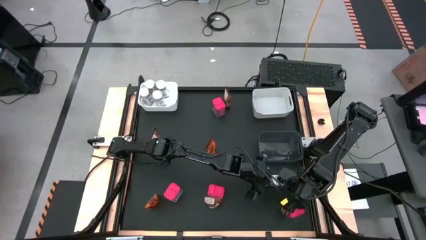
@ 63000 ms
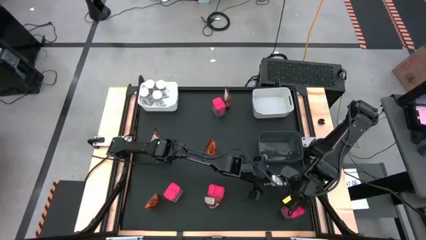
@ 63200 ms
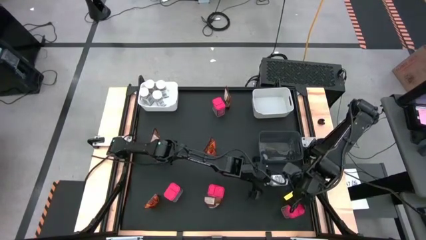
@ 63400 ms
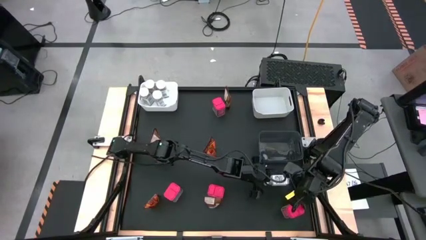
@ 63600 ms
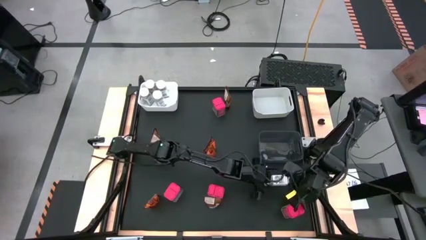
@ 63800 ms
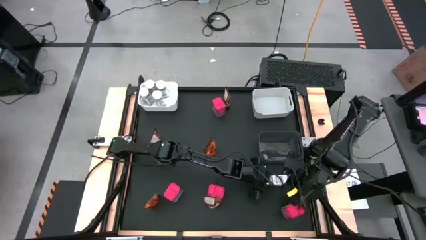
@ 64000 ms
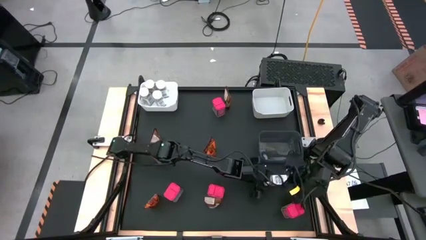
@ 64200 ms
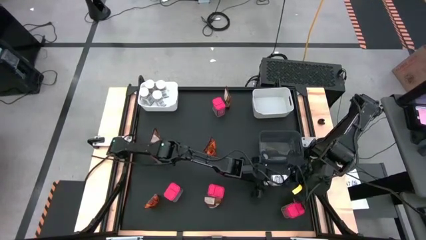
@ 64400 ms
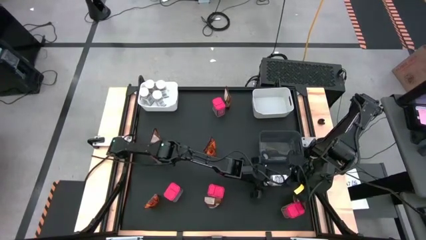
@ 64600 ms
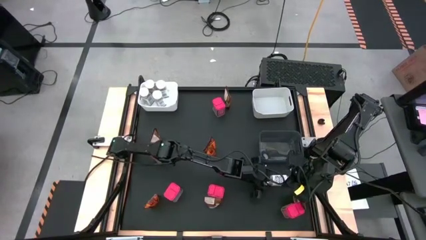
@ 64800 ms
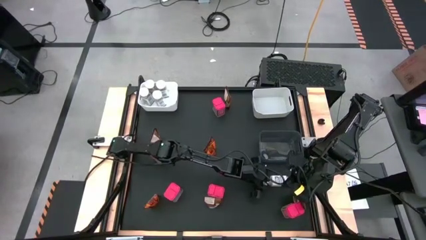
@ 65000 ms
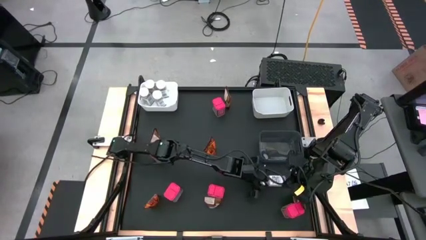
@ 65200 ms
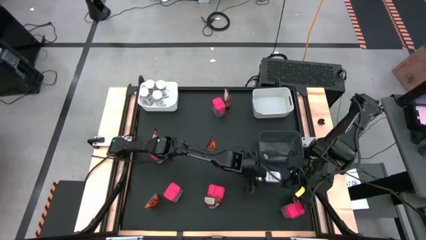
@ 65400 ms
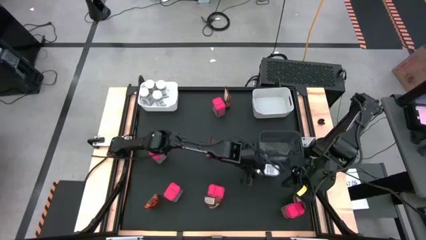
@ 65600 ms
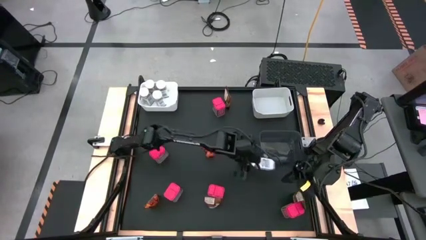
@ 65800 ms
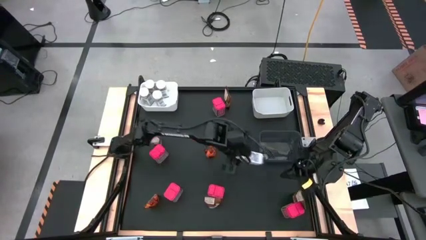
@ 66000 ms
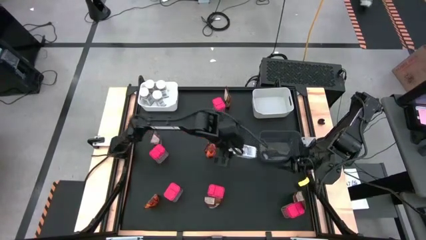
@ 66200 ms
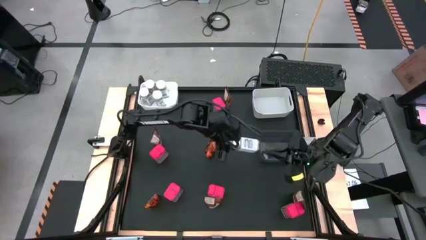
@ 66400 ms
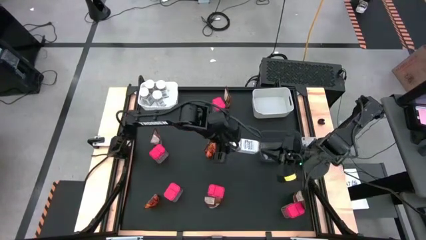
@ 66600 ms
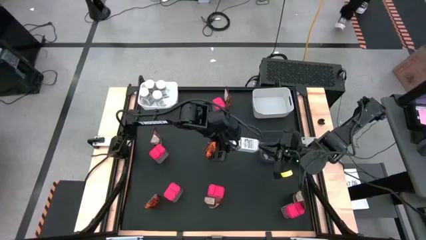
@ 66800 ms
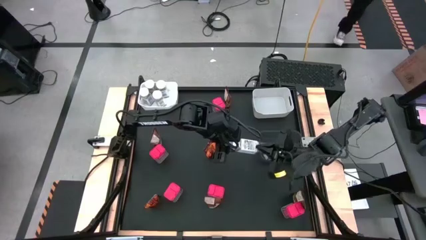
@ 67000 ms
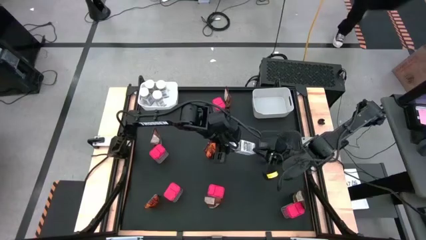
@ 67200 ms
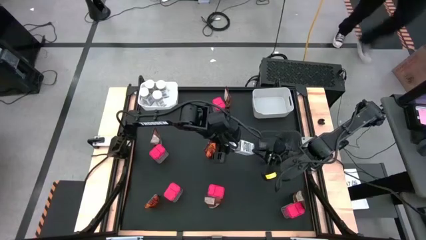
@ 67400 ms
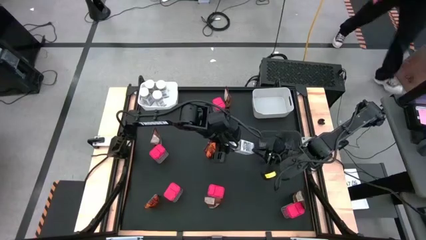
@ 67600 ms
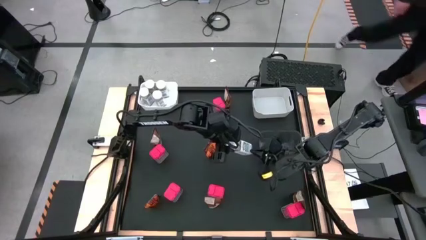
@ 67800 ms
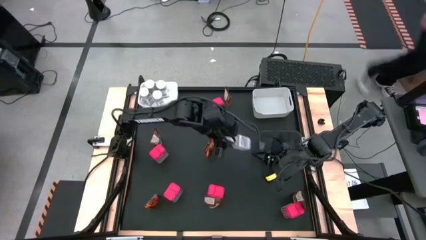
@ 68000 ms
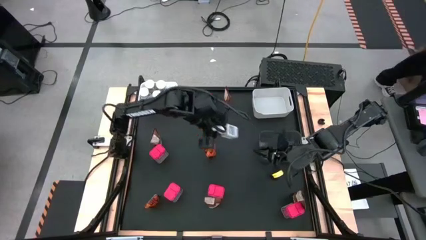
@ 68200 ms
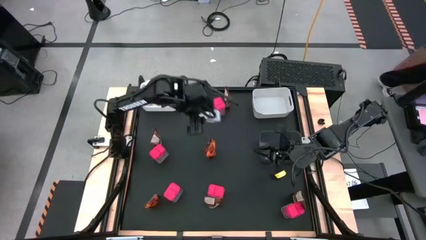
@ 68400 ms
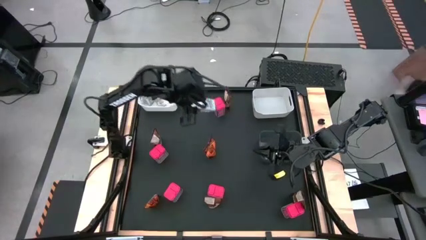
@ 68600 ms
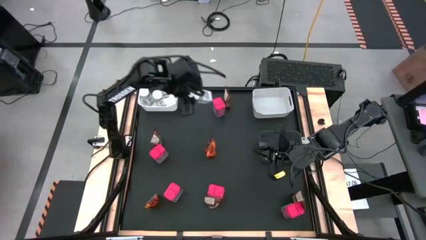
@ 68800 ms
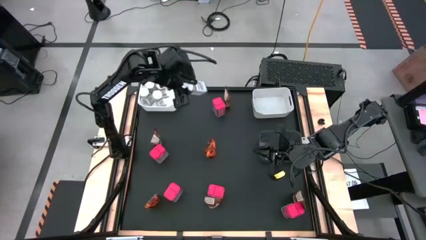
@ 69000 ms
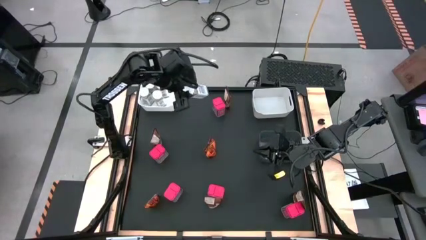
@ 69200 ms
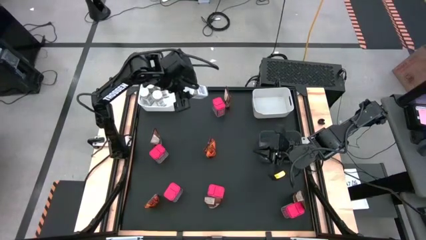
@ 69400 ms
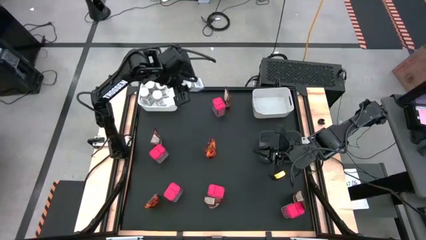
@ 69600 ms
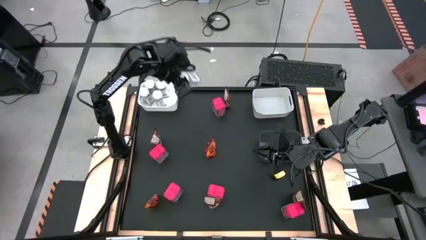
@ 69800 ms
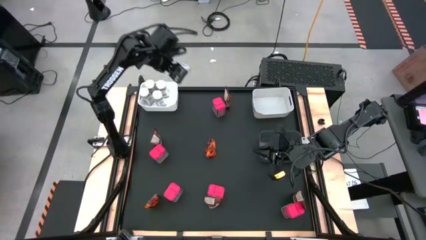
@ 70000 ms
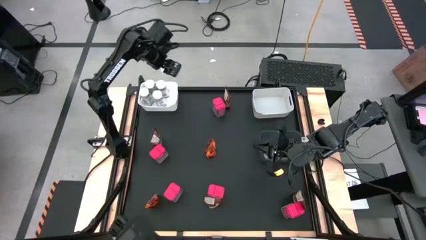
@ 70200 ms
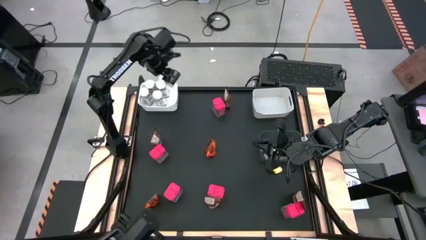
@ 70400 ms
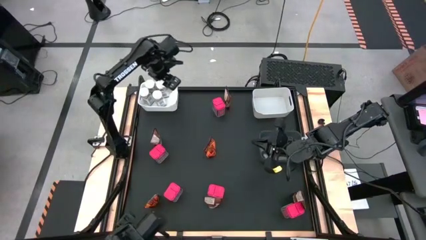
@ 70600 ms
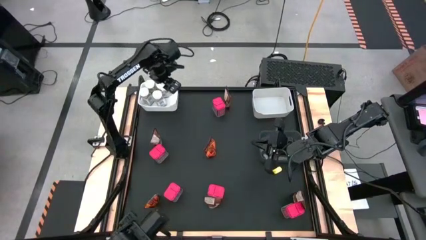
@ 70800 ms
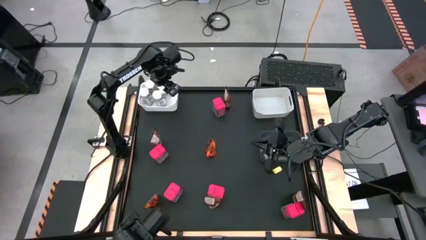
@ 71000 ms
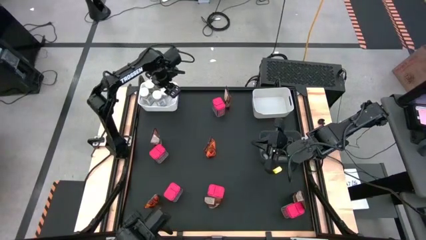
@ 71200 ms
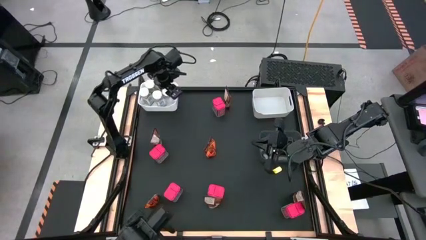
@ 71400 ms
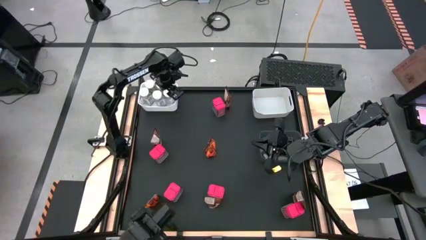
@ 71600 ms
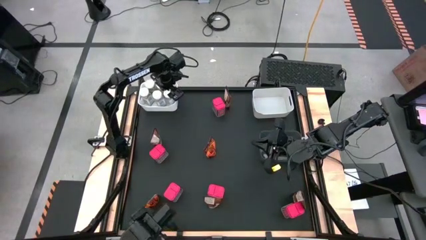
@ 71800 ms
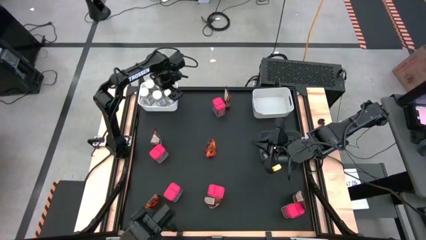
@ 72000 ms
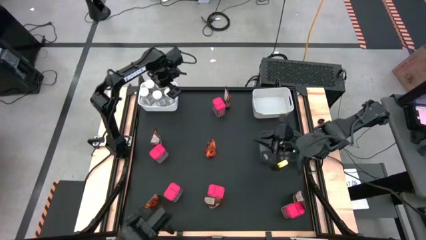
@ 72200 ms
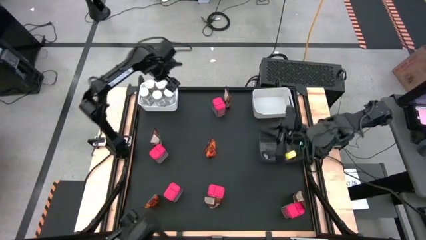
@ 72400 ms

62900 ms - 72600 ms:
Task: Sort spices by type
Put the white seasoning bottle into the left white bin
